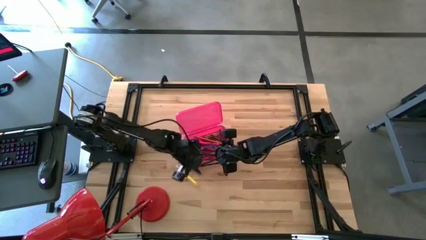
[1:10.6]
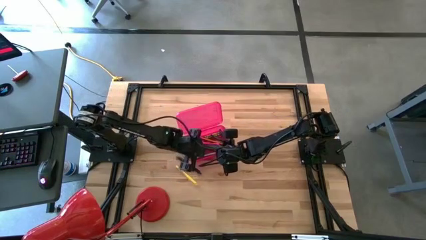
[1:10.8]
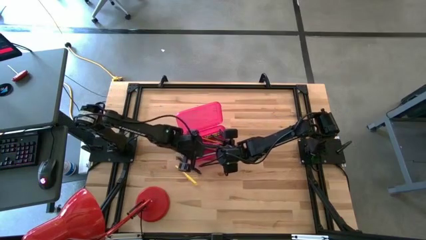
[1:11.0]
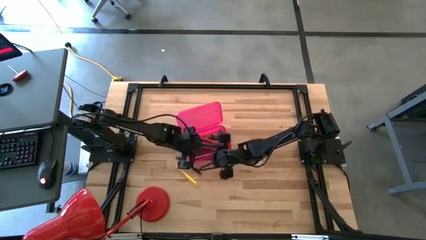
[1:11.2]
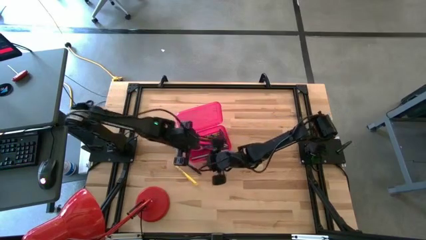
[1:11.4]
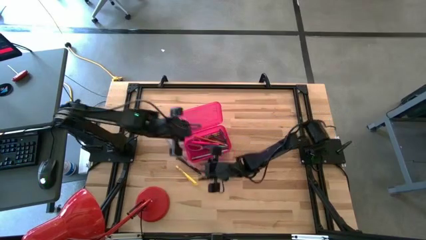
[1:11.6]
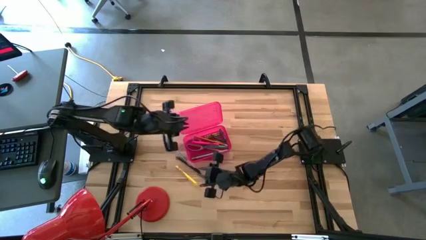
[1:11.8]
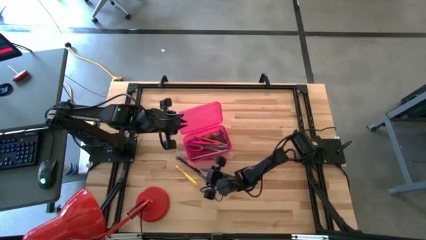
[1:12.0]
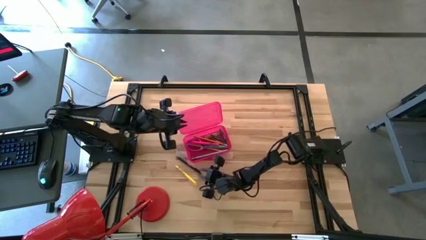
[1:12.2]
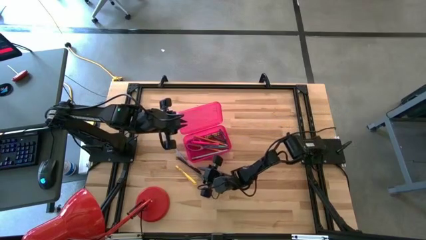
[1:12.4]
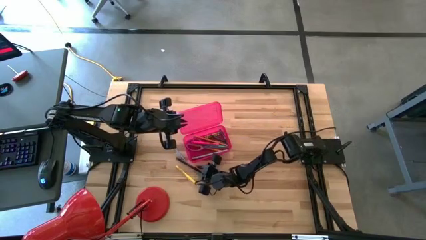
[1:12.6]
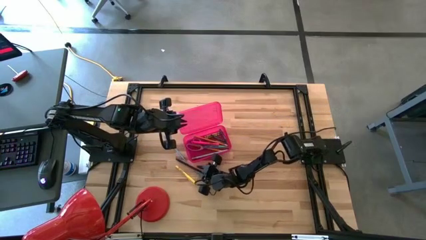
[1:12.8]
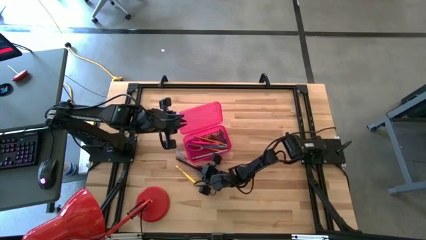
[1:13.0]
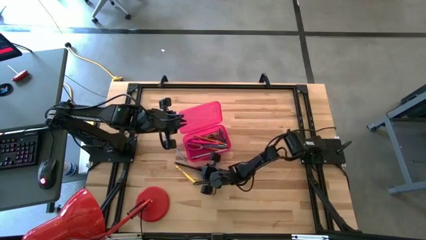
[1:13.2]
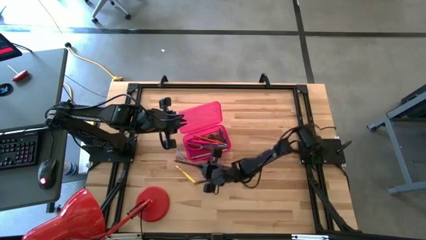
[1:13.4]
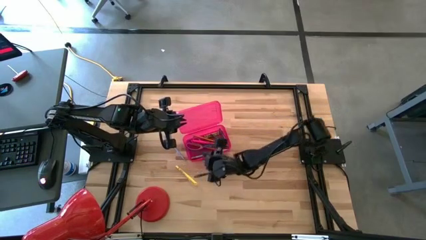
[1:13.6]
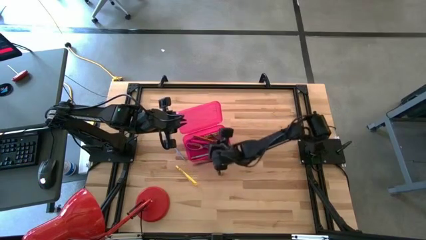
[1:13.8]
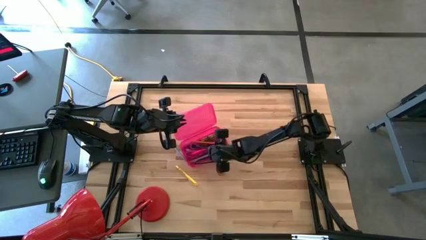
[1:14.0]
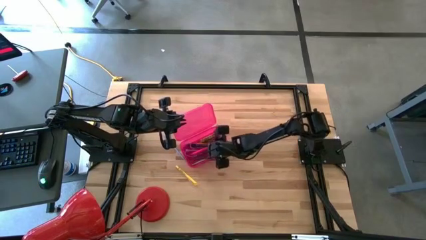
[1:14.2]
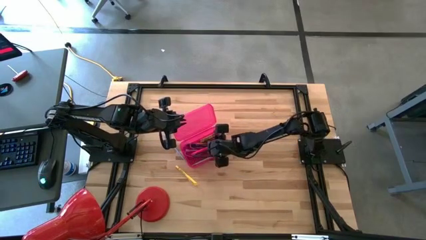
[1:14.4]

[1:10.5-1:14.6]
Task: Pick & place school supplies into a supply box
Put the top black pen into the pink supply box

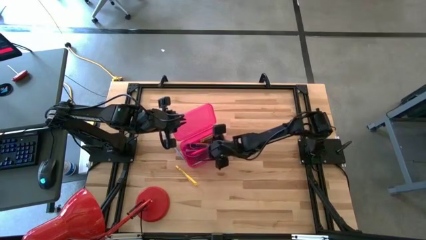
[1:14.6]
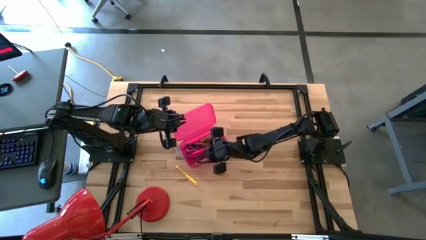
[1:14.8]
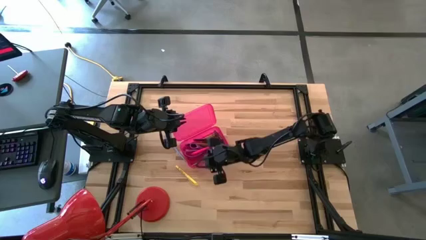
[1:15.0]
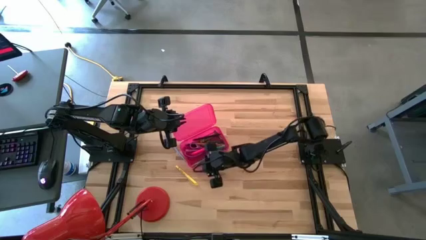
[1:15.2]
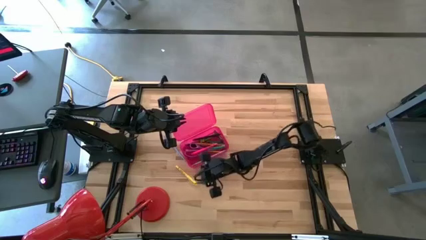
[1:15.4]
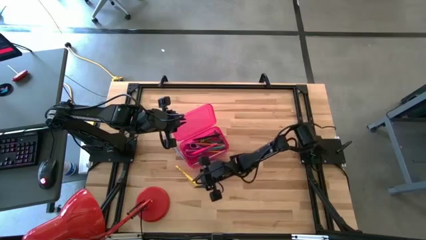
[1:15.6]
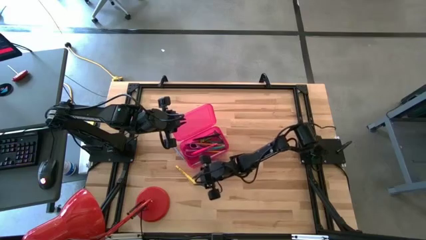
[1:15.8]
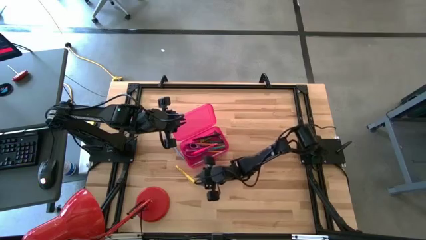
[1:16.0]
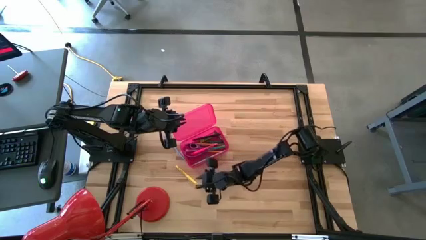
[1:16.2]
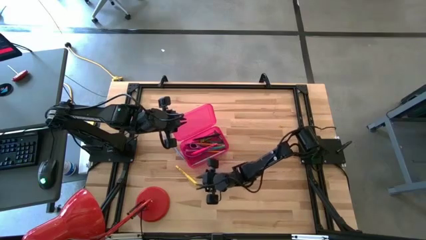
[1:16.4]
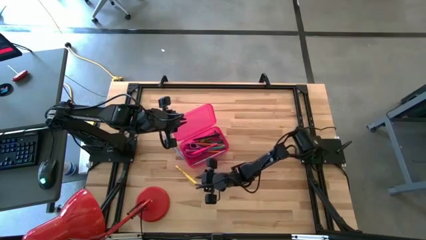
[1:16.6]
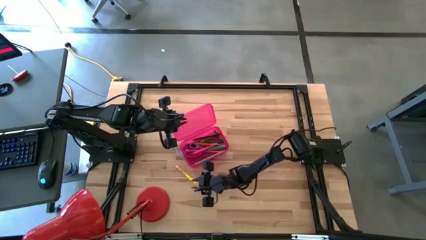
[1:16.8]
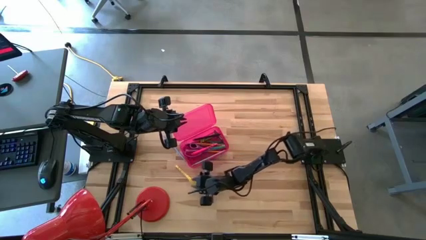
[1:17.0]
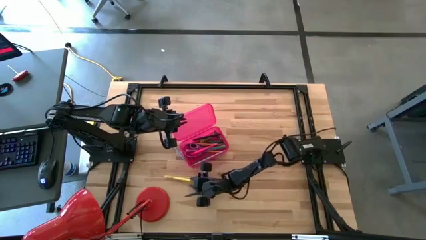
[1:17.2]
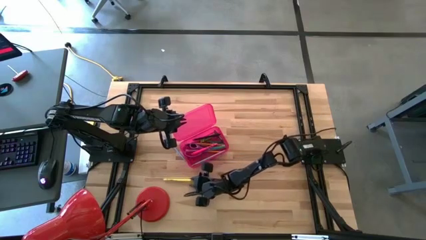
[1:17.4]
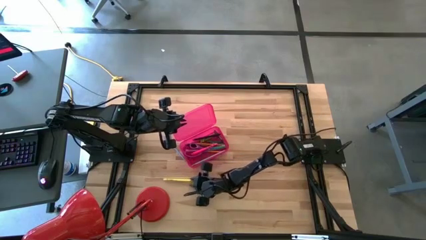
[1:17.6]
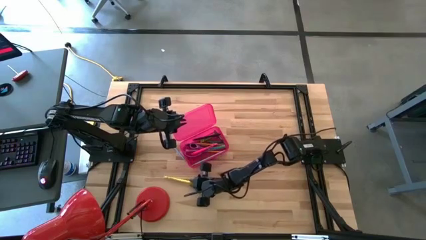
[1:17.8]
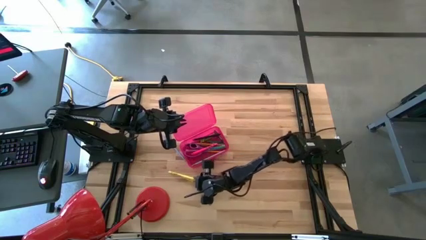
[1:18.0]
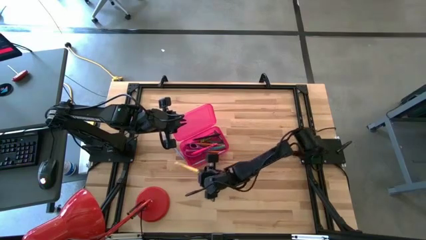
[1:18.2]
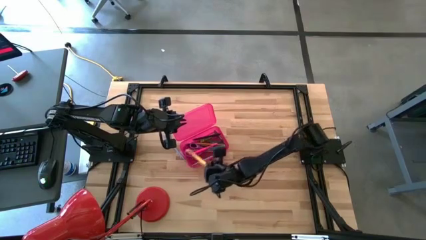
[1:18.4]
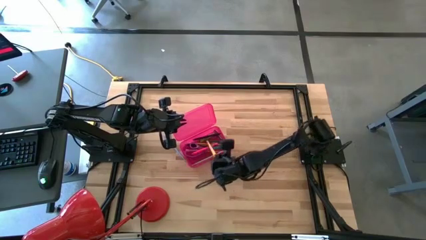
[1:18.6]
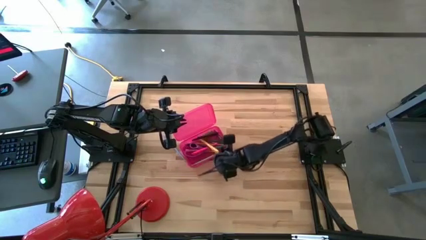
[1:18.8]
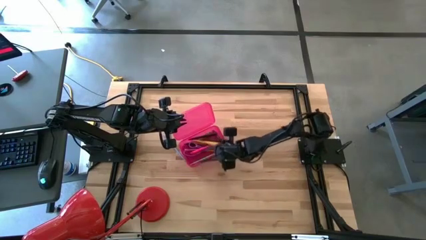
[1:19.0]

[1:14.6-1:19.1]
Put the yellow pen into the pink supply box

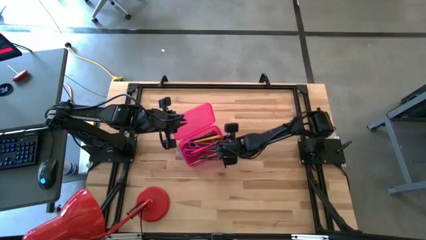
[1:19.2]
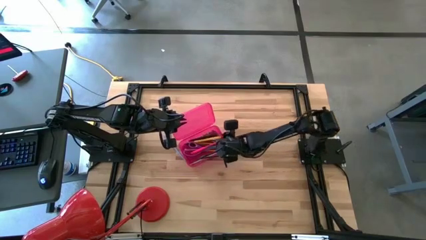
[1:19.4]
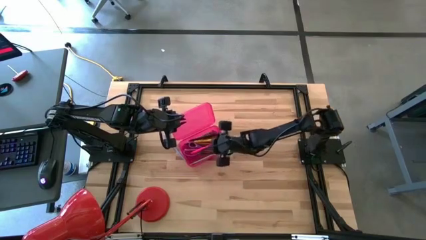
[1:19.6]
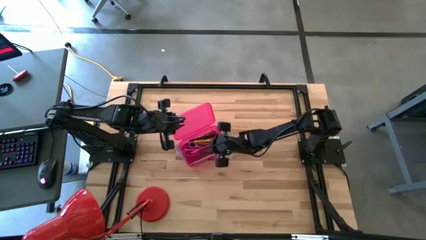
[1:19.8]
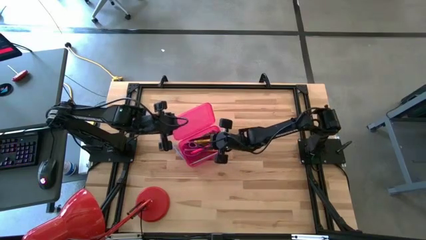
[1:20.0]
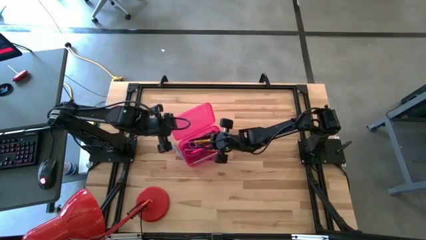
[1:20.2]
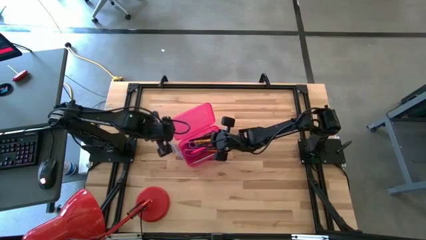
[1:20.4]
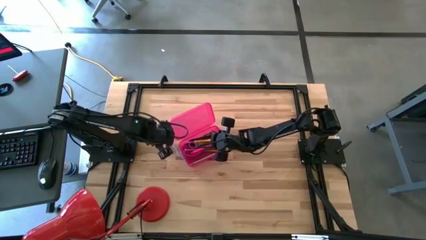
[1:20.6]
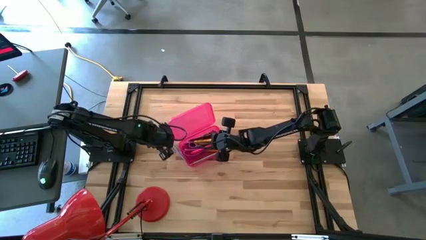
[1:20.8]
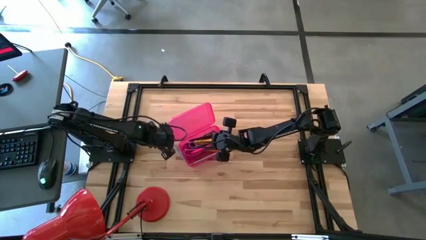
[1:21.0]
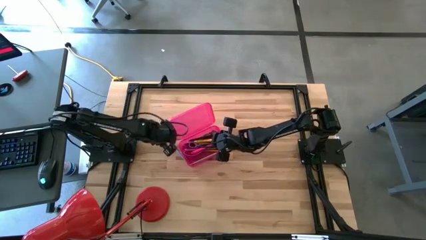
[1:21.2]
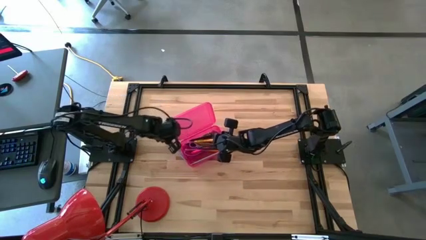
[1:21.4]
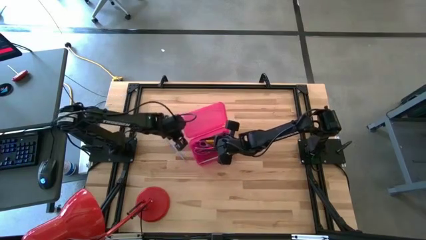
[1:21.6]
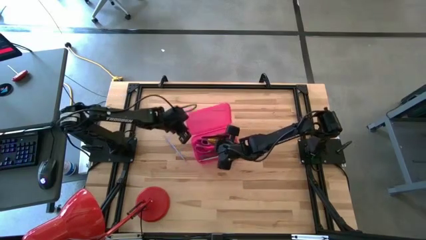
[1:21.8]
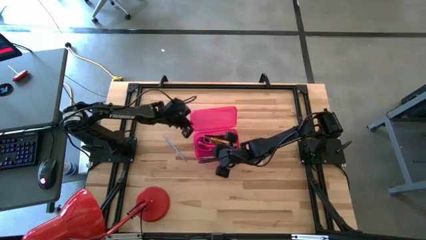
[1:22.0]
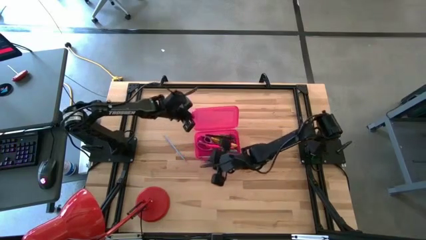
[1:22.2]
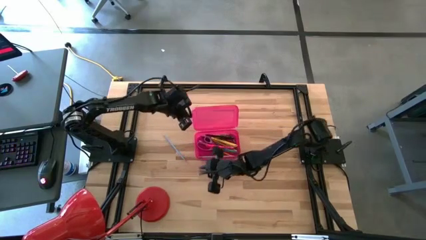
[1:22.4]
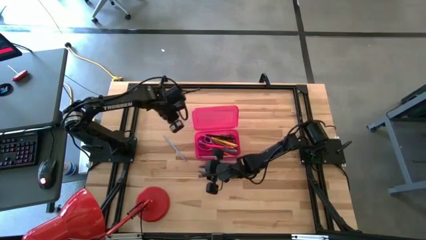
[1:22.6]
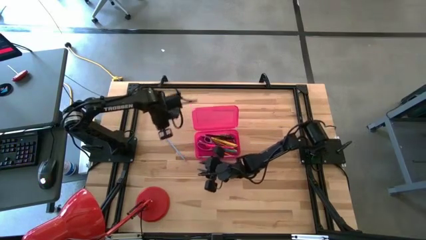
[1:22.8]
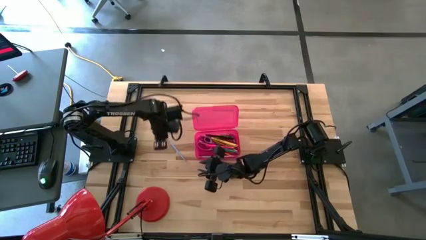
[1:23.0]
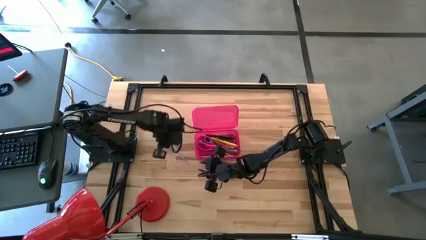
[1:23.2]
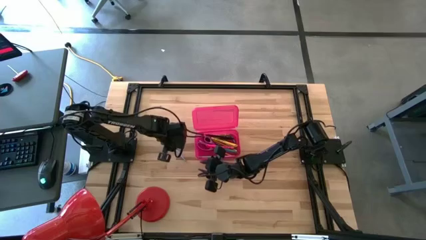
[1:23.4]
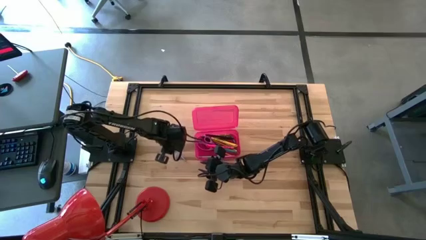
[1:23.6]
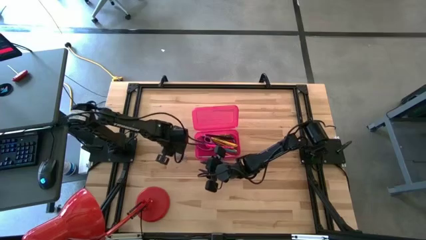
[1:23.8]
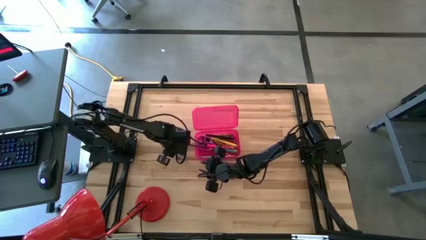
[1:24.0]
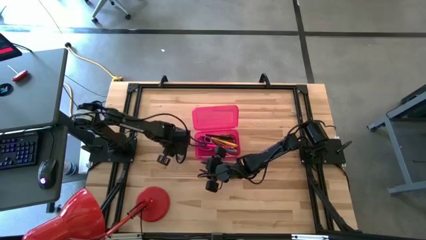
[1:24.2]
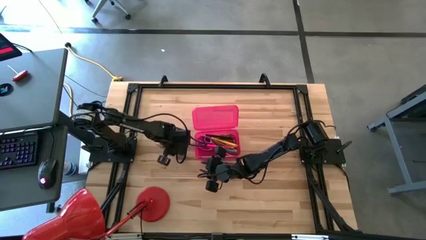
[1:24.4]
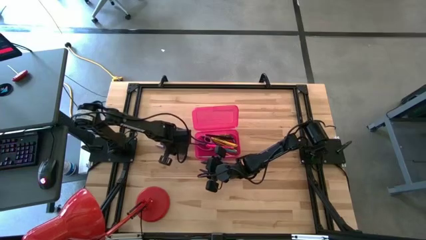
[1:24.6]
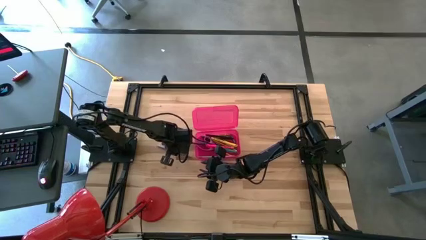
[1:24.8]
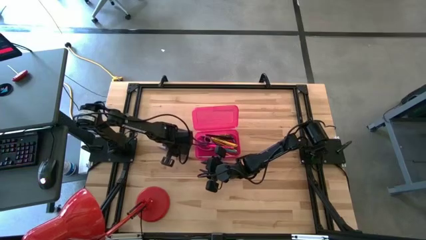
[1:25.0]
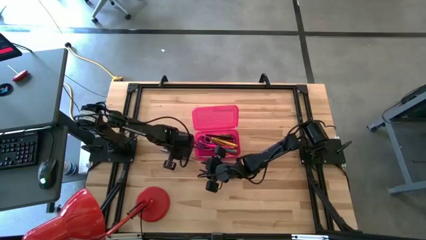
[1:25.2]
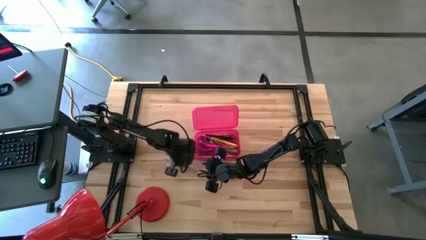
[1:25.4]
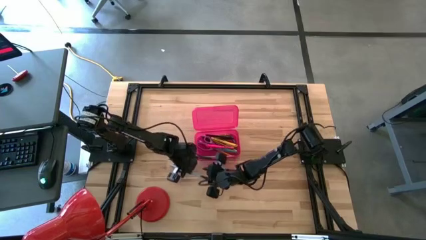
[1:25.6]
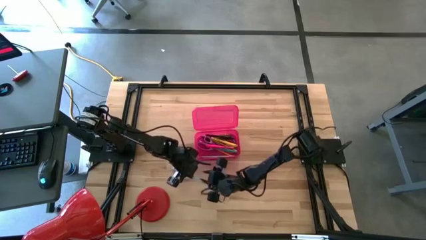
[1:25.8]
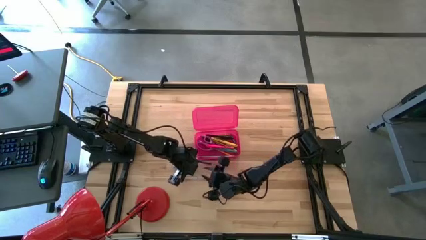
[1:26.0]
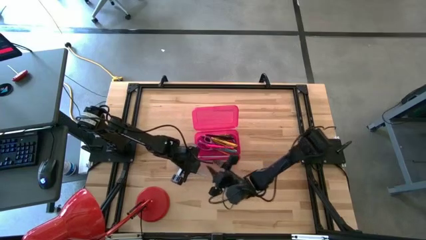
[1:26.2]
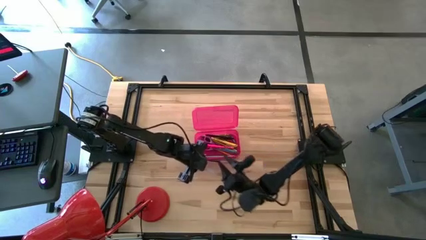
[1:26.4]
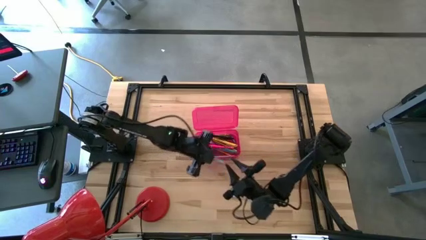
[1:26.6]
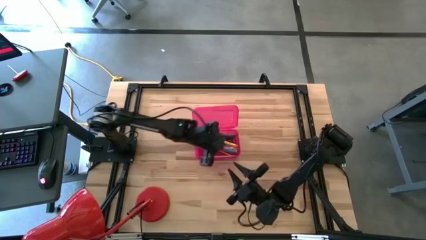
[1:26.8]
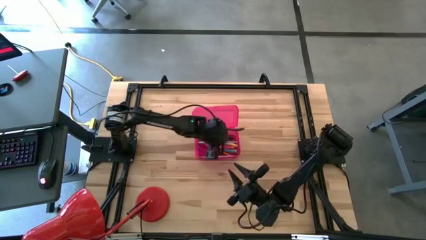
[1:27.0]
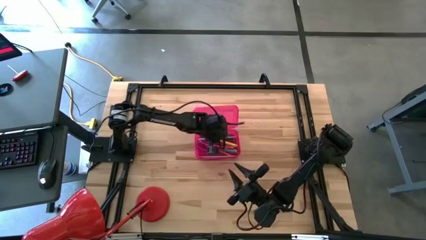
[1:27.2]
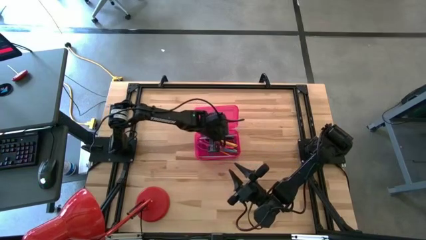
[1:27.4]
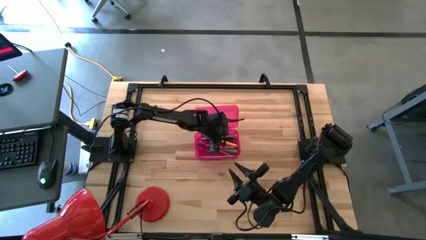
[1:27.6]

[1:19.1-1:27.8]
Put the blue pencil into the pink supply box
